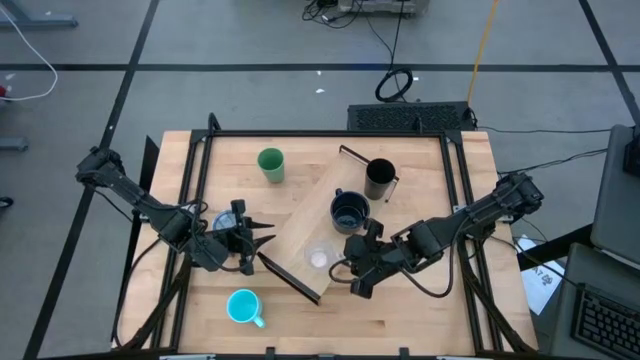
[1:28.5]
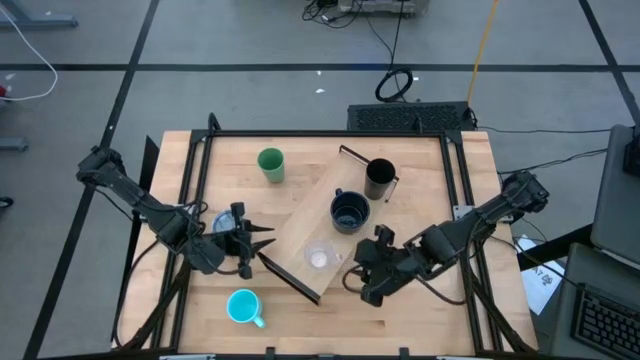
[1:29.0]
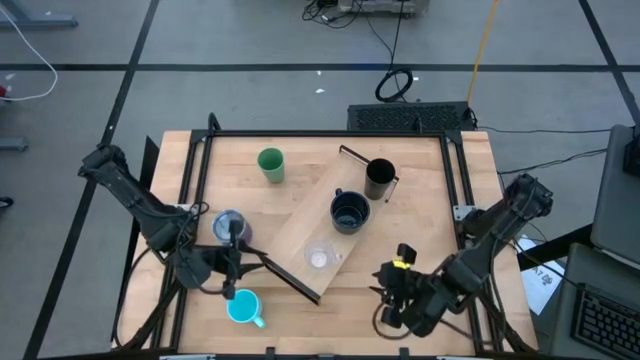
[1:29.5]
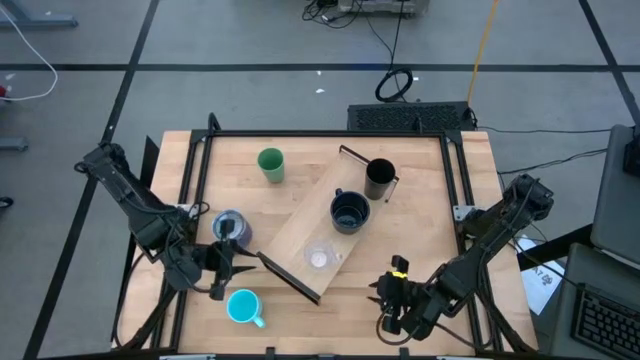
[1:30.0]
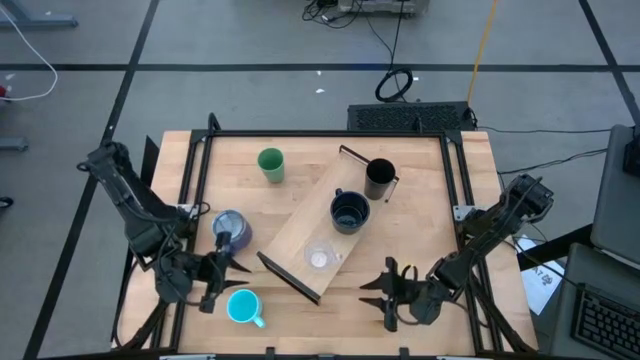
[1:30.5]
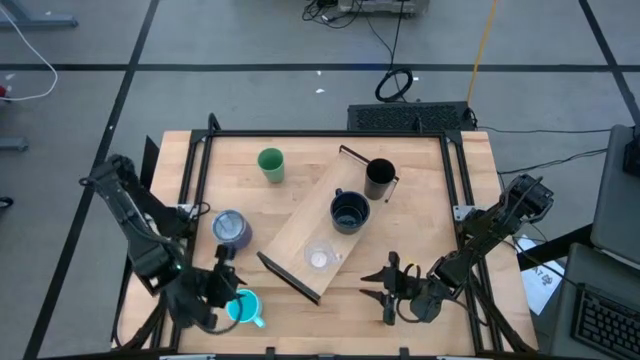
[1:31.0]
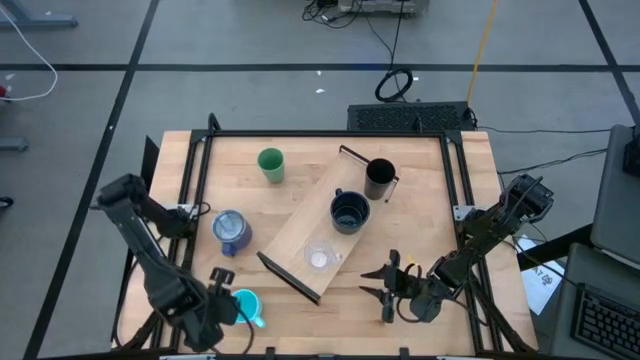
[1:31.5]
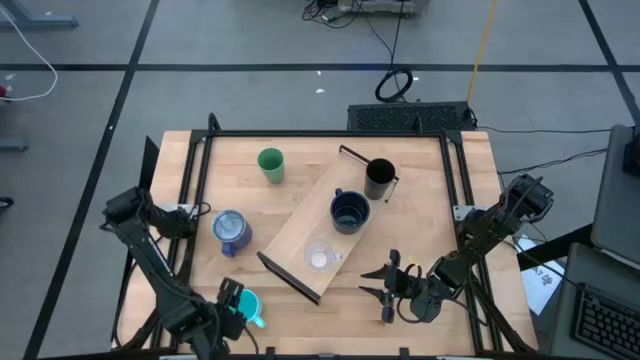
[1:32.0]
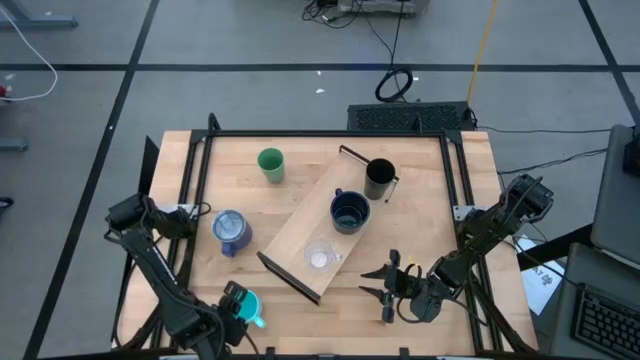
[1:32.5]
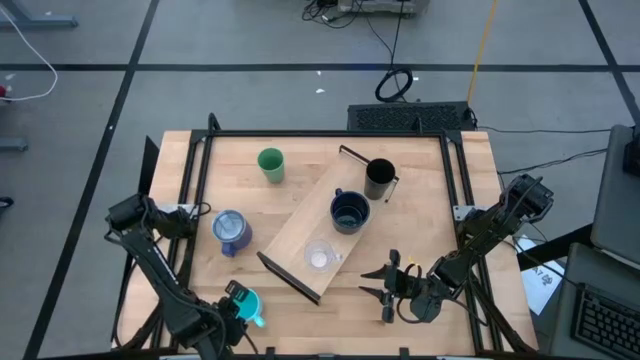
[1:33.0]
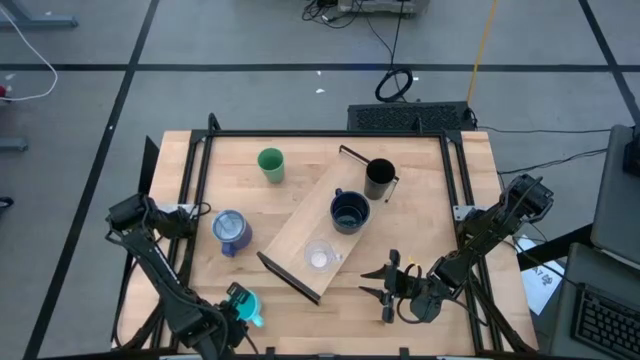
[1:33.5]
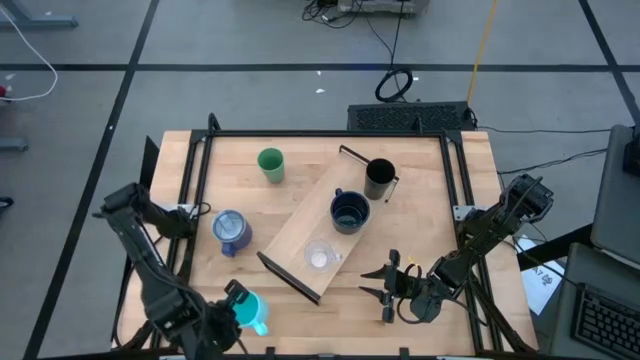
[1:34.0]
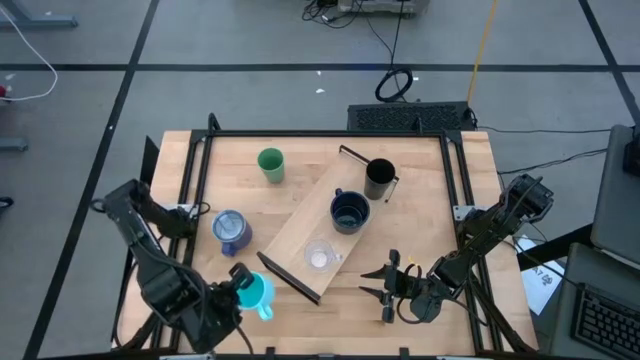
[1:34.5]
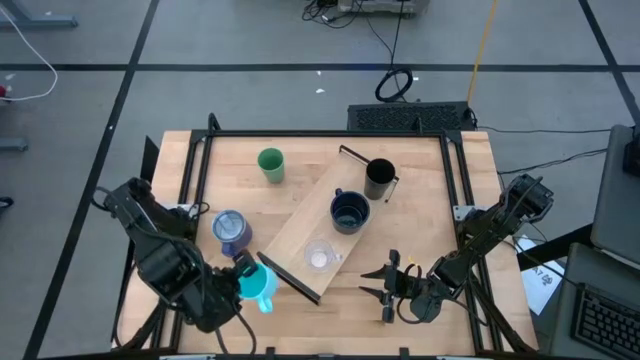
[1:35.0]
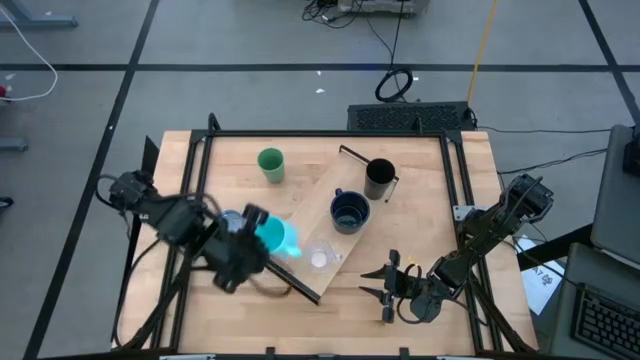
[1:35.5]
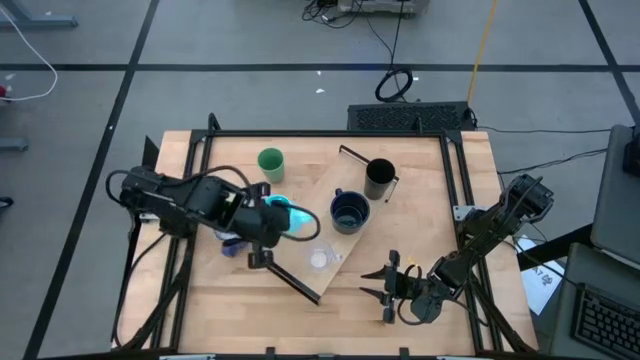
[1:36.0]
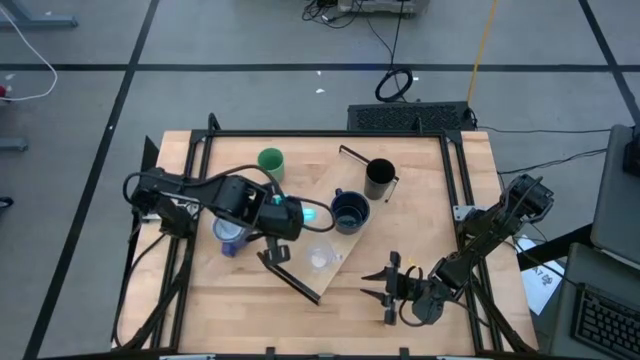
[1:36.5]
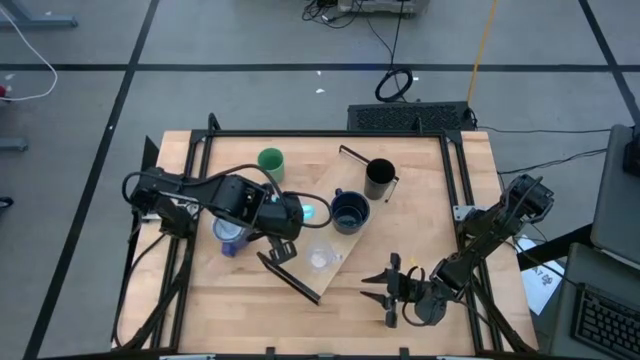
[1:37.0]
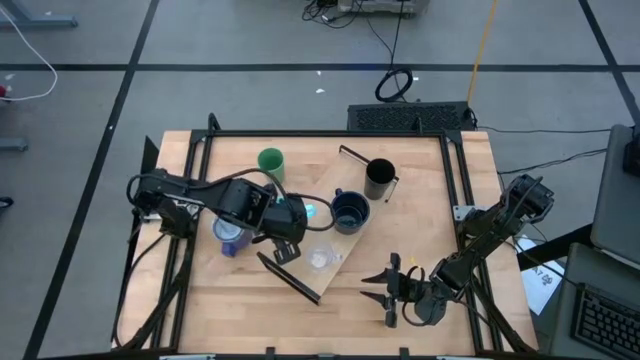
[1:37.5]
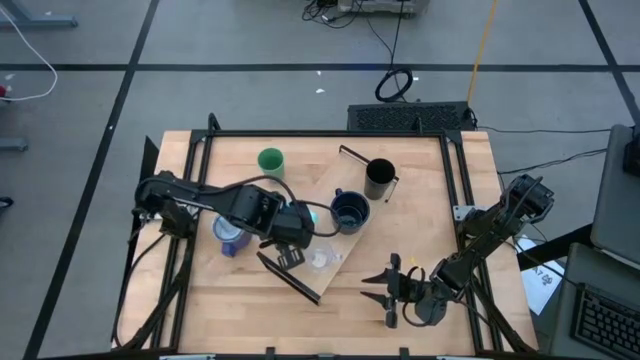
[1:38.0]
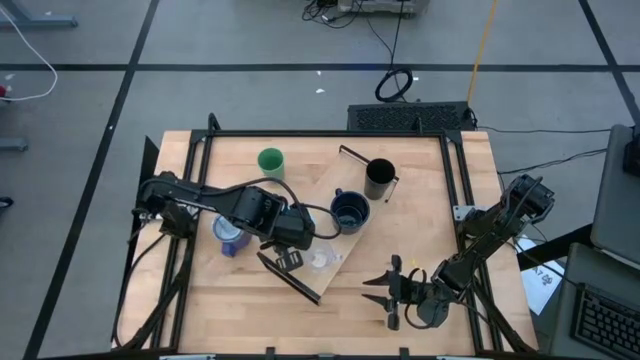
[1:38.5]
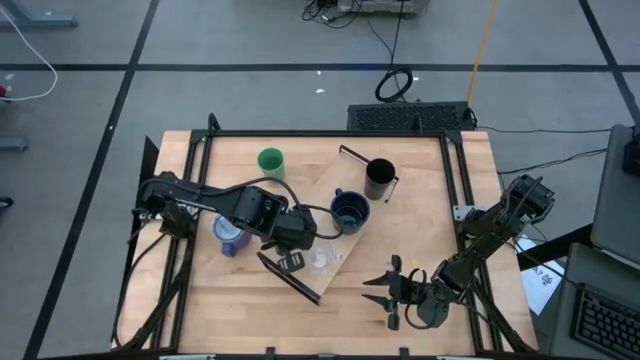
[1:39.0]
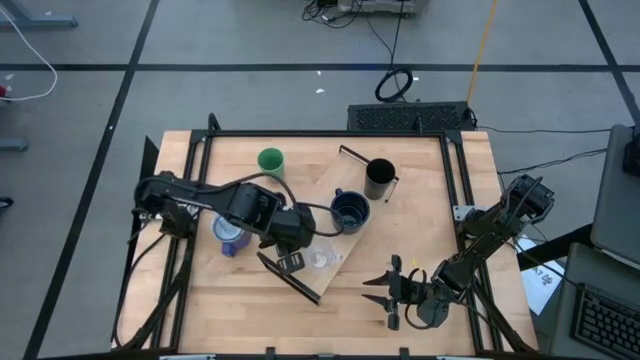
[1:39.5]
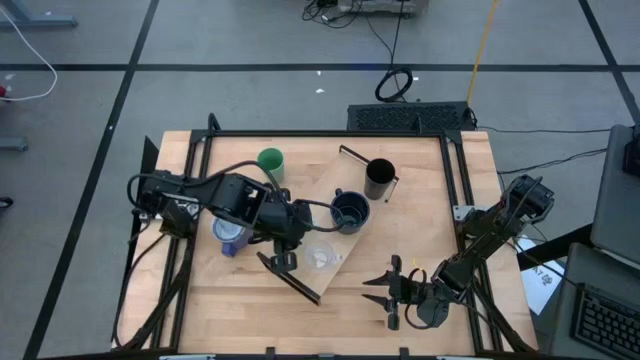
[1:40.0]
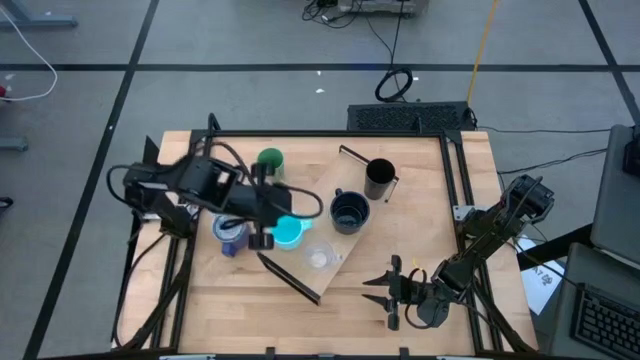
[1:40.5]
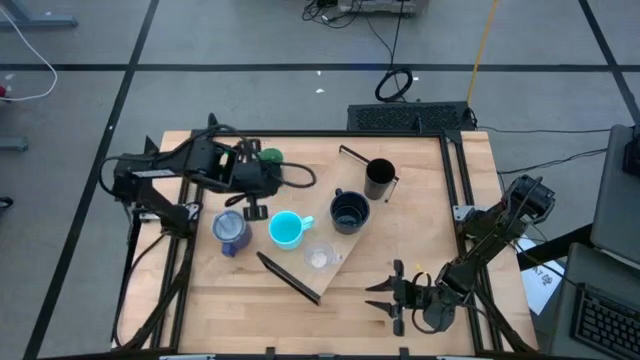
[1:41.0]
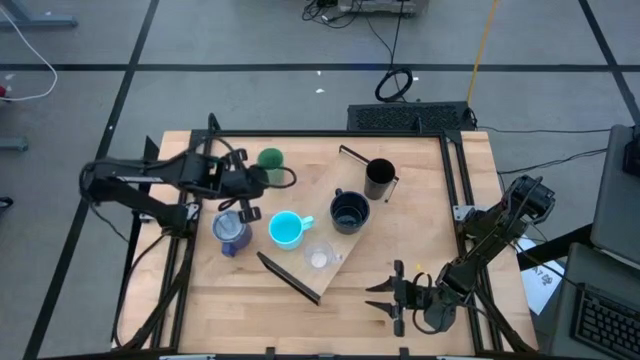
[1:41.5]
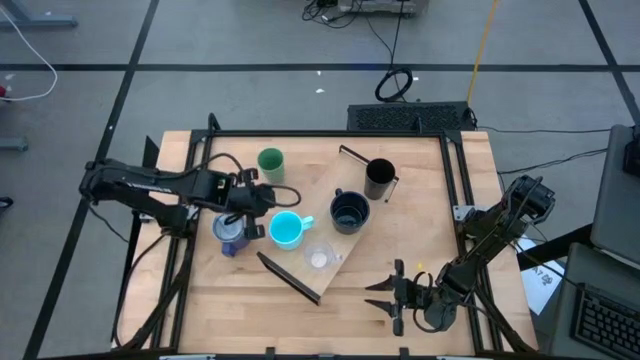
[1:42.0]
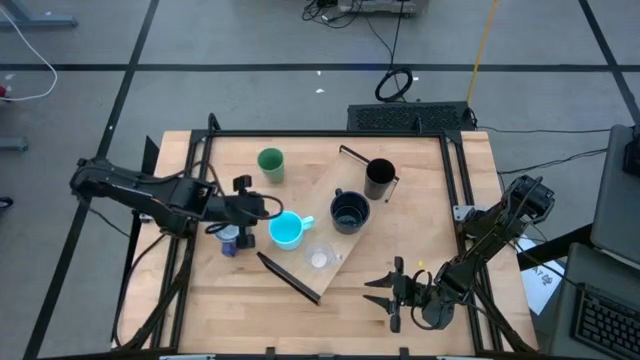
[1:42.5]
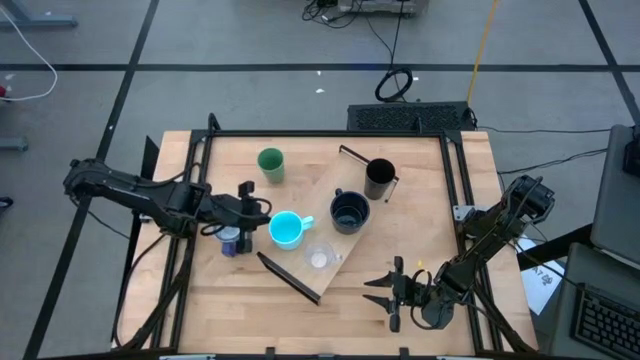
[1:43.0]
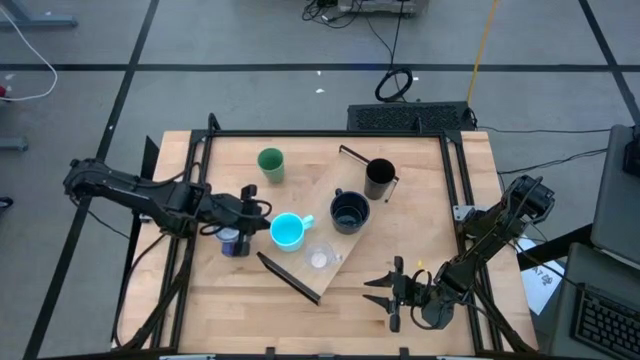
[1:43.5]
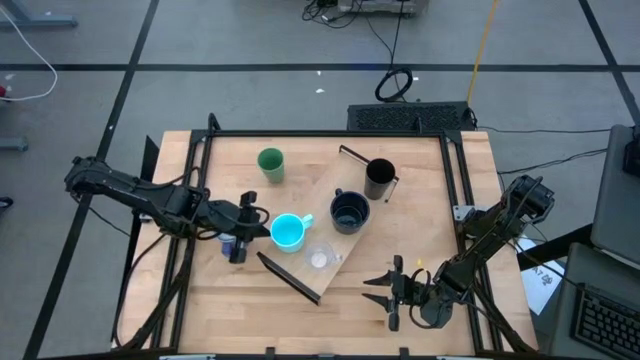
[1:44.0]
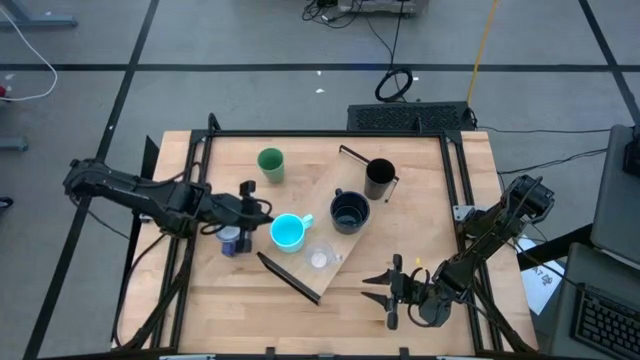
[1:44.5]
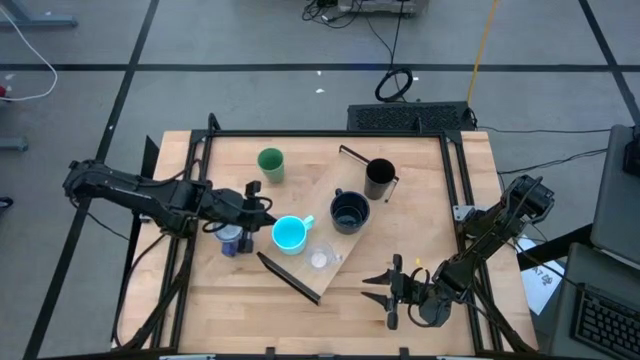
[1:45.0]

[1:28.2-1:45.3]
Task: Stack small to large cups/mugs on shelf
Put the light blue cup on the shelf aligned with the transparent cup
